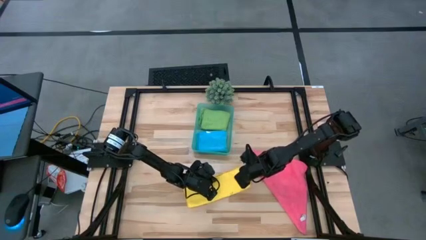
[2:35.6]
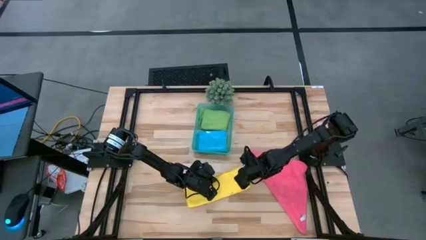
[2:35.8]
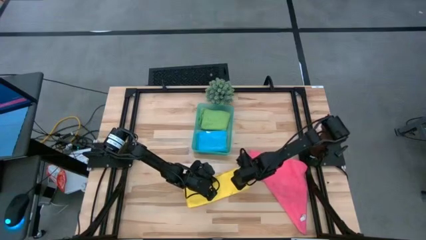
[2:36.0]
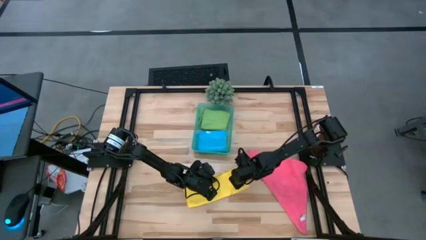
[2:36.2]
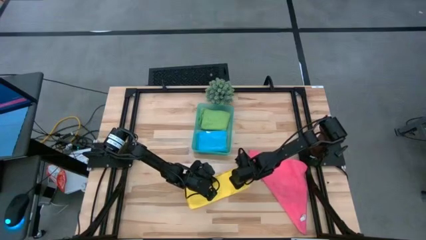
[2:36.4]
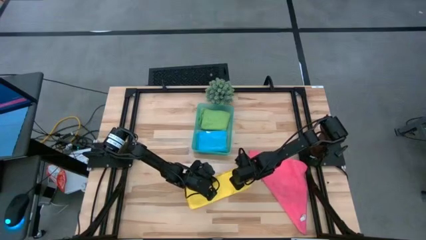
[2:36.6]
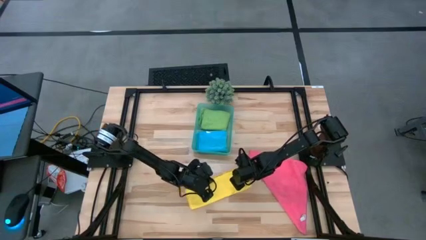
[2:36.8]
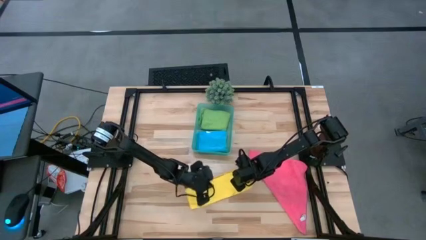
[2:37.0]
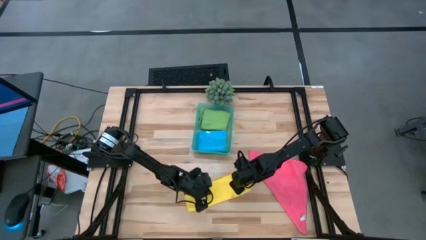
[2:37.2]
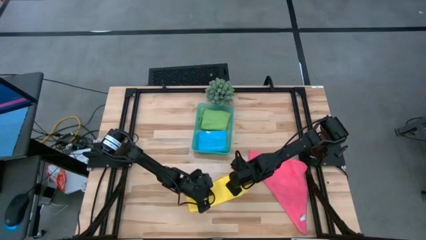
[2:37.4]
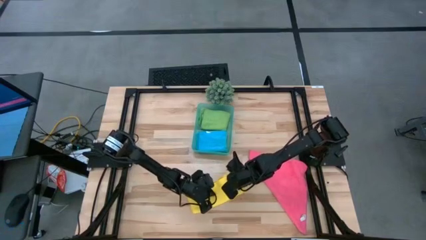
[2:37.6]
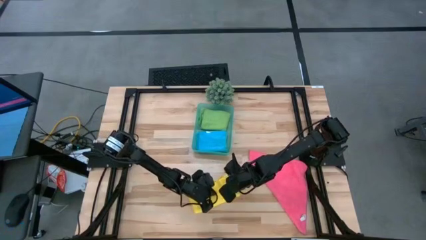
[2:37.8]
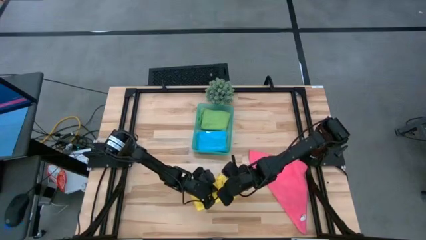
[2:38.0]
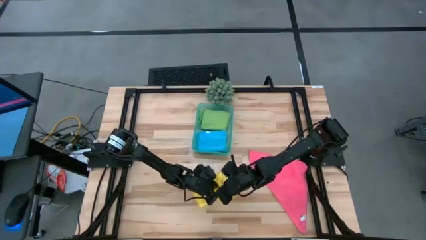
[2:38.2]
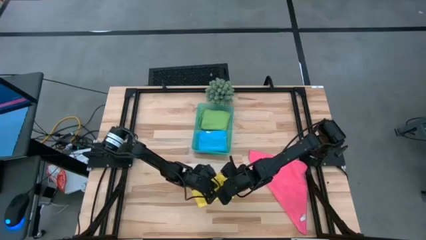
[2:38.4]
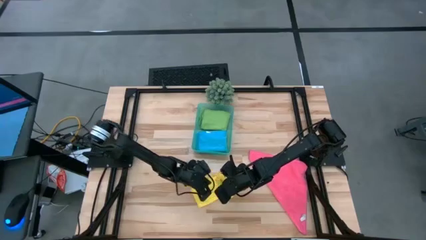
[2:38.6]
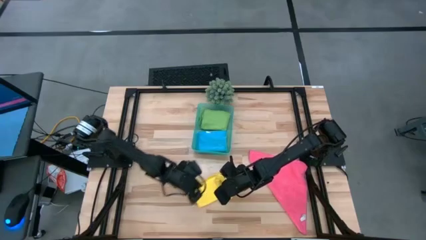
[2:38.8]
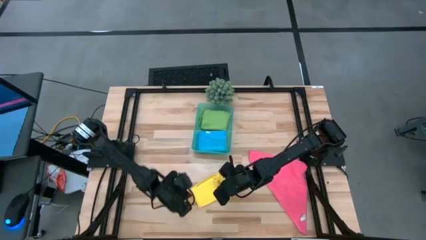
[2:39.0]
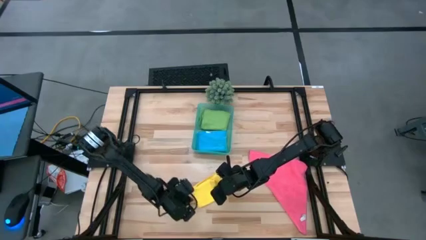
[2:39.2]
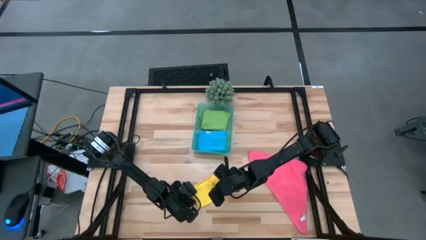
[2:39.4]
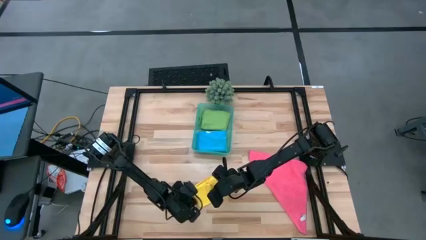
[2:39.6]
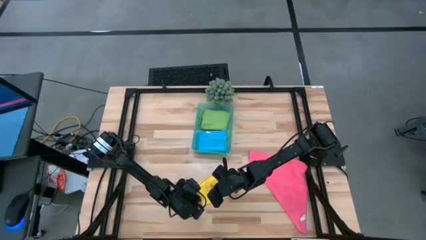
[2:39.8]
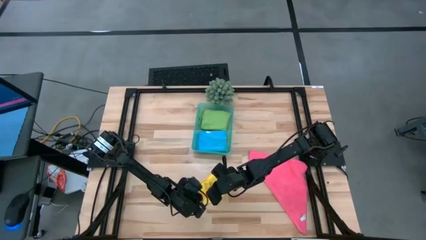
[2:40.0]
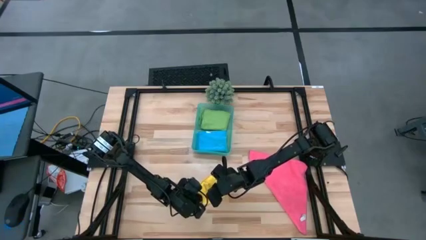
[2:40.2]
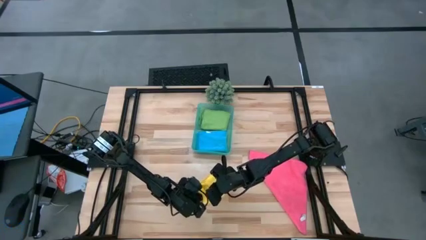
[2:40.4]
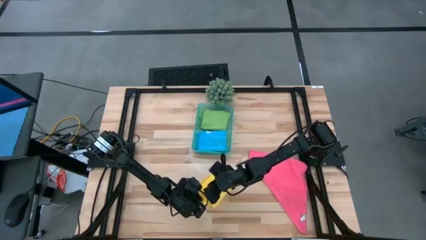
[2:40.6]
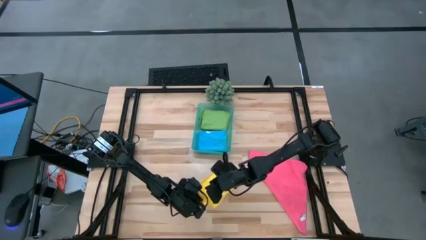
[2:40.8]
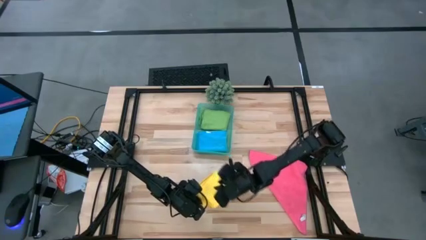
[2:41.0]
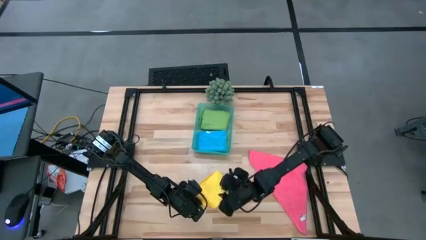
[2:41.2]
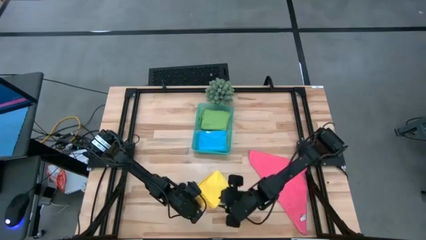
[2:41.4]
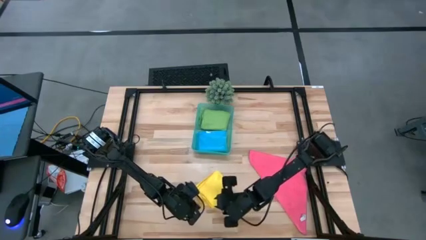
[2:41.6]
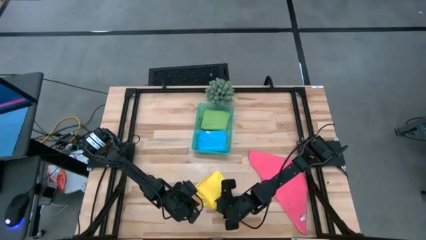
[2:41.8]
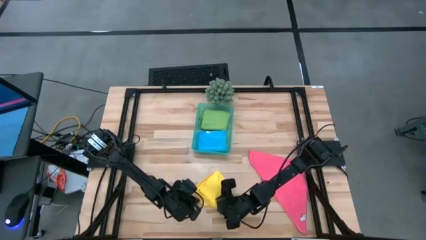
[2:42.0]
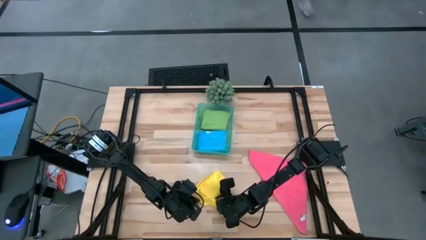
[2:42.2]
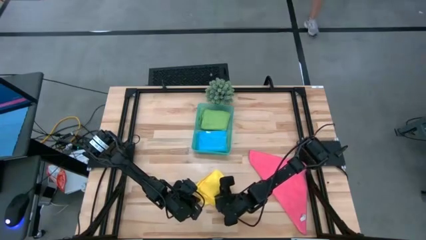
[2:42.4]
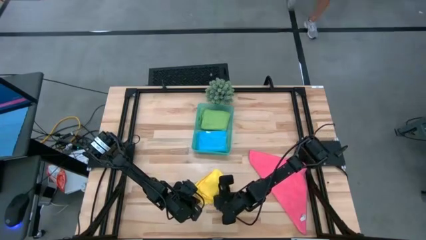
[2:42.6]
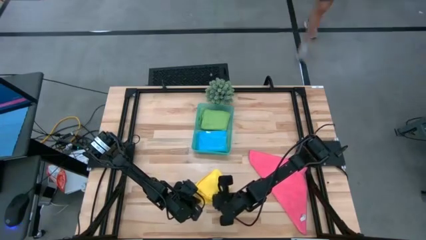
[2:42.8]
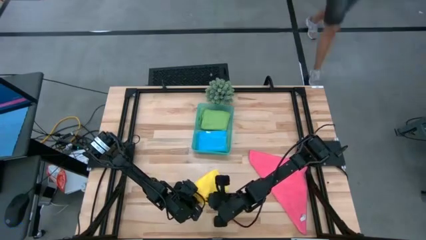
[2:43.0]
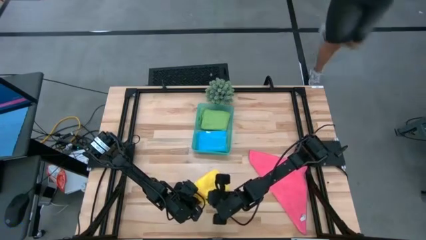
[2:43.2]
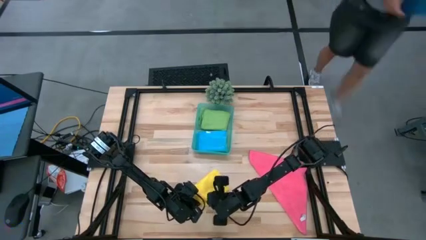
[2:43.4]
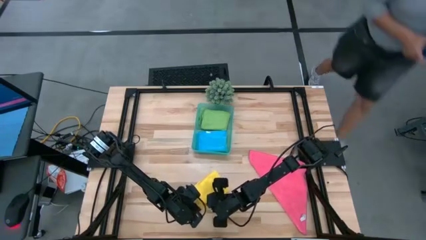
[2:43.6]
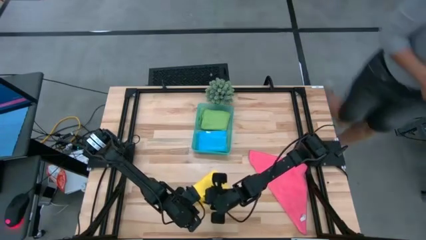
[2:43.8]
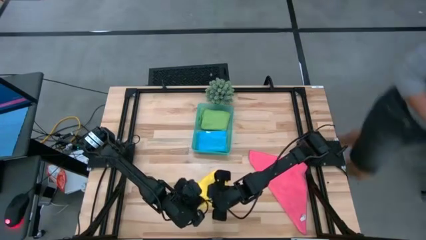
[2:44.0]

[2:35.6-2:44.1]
Task: Fold microfiber towels
Fold the yellow micro fiber cloth

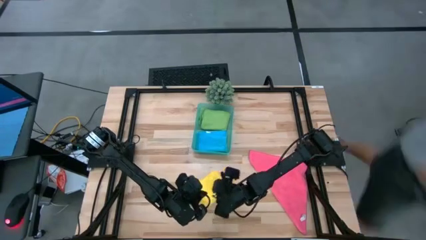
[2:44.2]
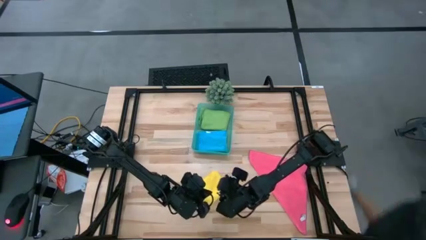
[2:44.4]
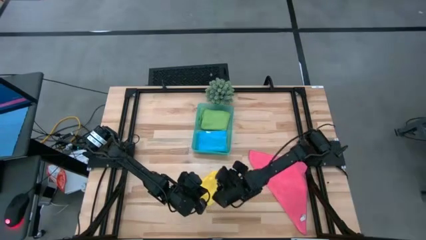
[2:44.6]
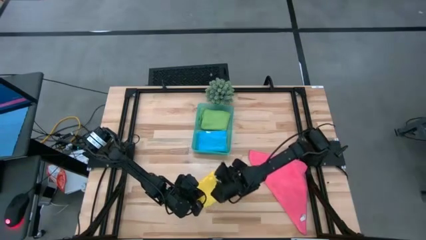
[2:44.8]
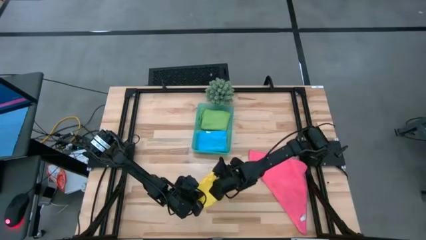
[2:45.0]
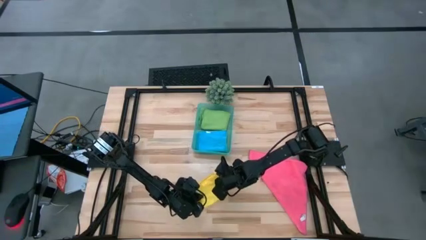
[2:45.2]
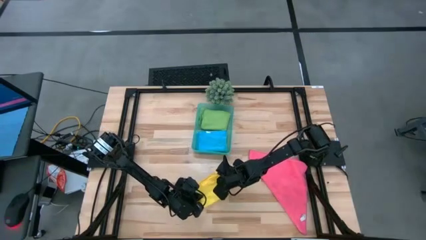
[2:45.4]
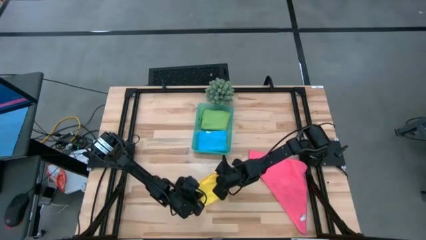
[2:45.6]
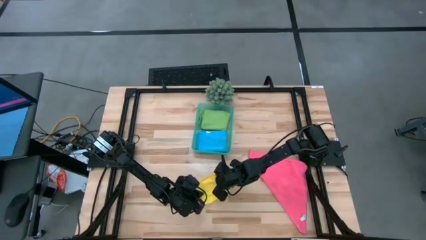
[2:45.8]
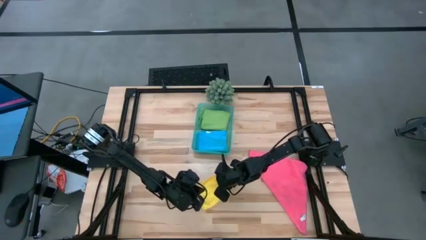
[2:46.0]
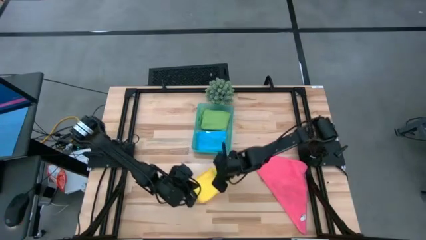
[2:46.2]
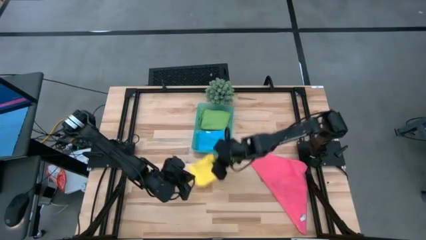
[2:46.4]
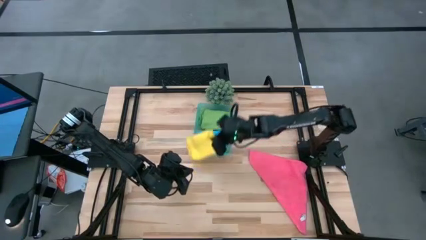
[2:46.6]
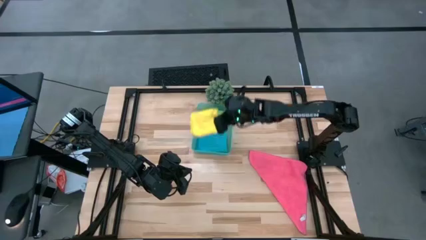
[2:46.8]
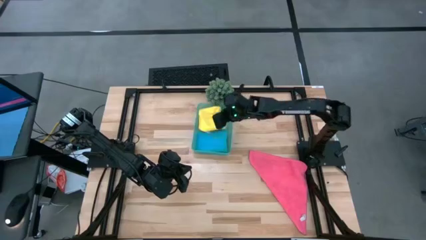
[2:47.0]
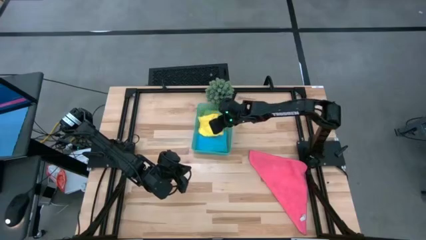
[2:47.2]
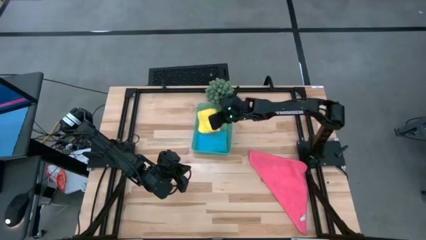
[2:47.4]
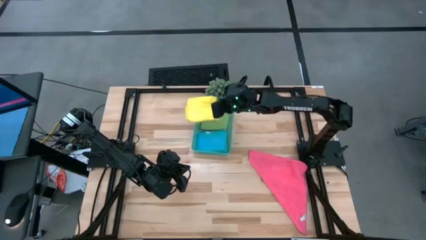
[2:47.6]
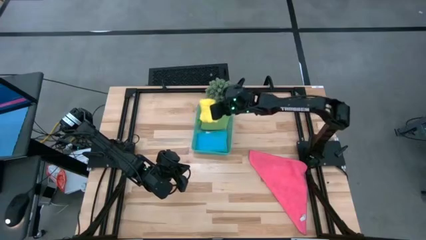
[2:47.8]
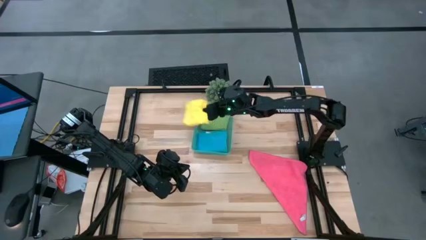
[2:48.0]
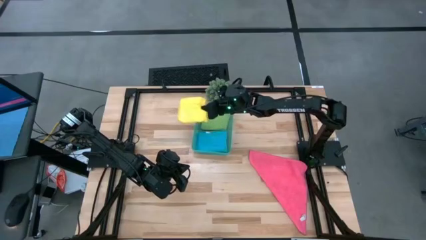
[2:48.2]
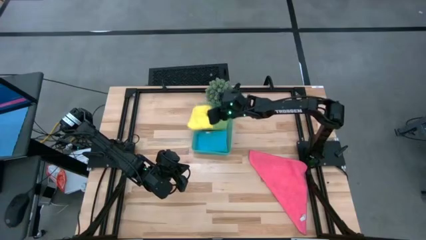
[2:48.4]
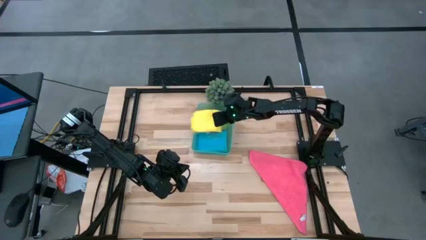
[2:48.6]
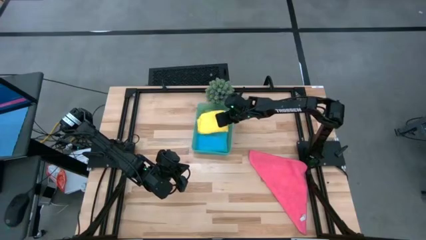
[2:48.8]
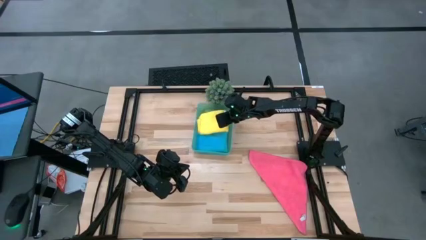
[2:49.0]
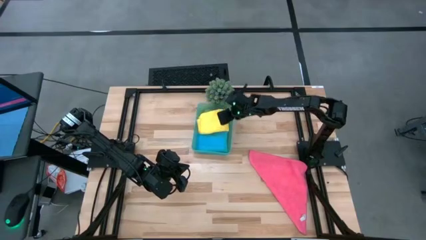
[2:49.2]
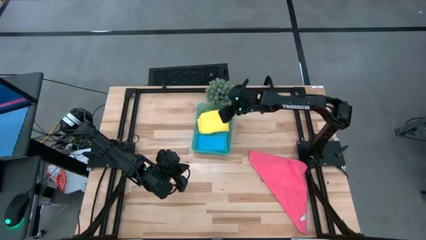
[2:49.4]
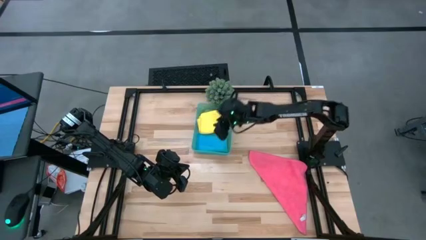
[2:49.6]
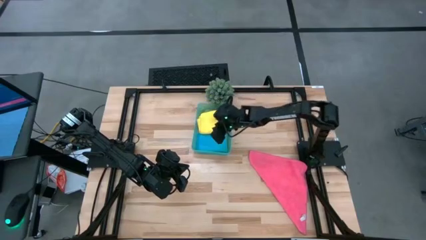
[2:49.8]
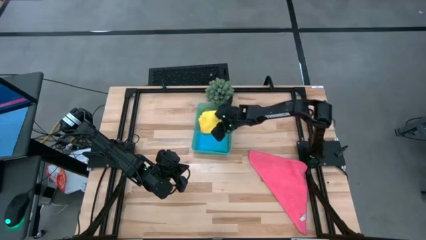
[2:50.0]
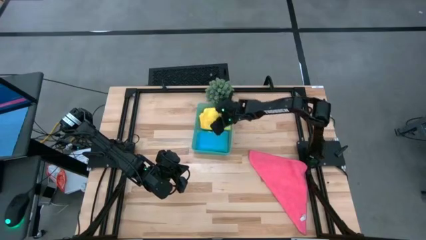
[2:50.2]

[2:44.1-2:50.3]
Put the yellow micro fiber cloth into the bin on top of the green micro fiber cloth

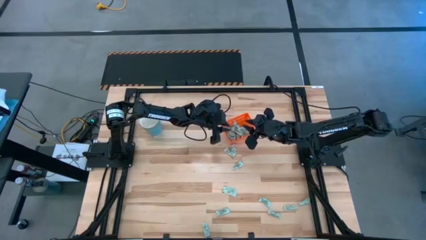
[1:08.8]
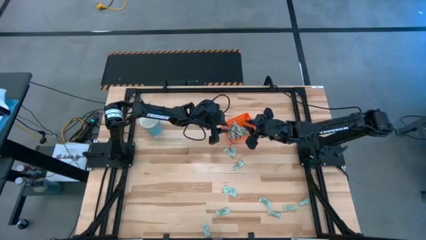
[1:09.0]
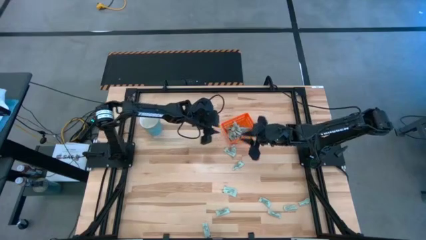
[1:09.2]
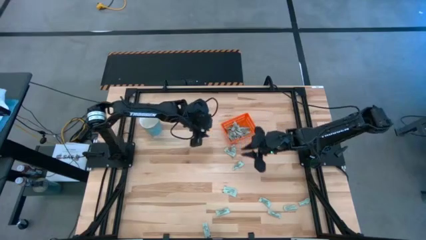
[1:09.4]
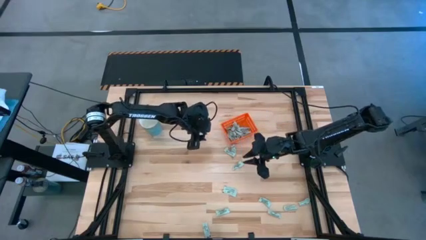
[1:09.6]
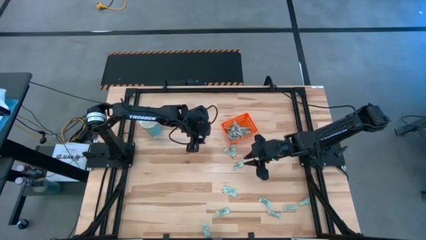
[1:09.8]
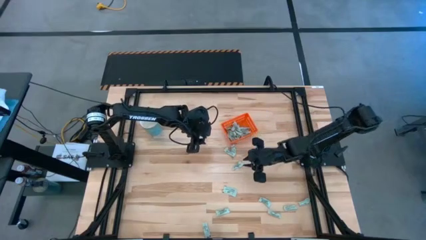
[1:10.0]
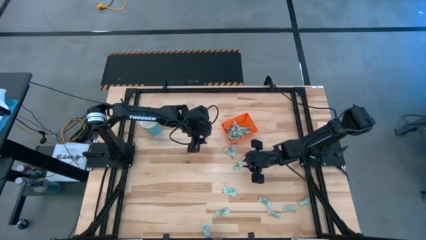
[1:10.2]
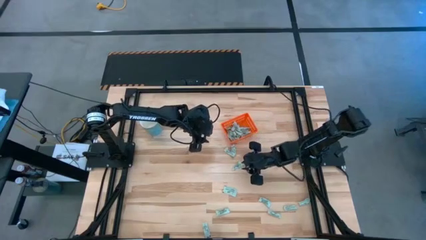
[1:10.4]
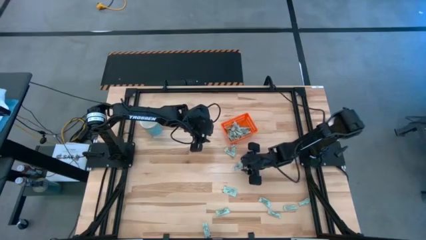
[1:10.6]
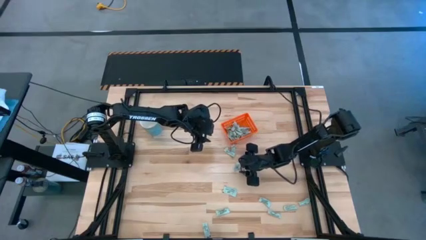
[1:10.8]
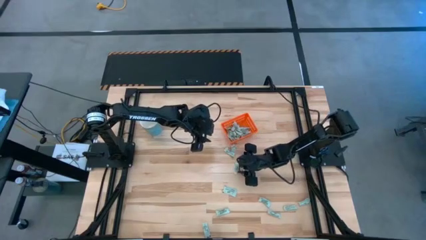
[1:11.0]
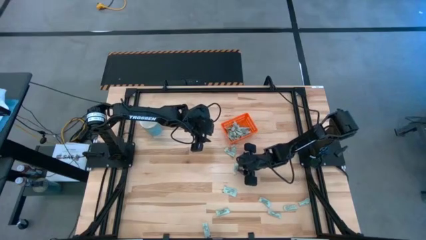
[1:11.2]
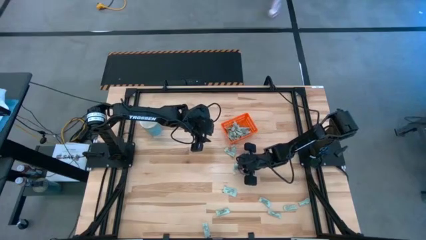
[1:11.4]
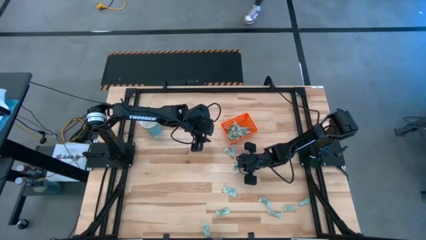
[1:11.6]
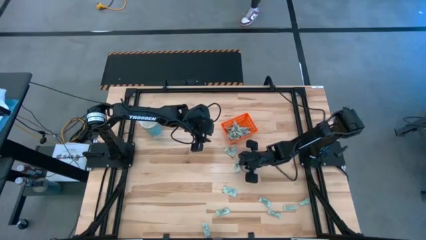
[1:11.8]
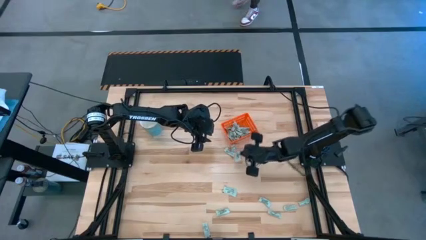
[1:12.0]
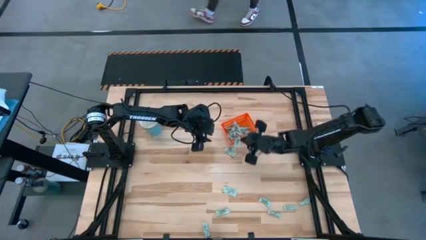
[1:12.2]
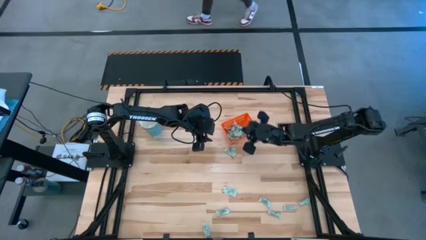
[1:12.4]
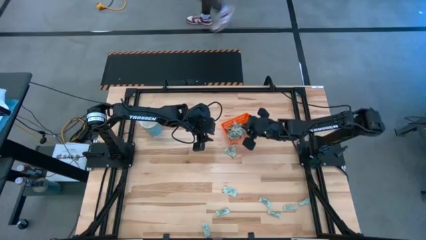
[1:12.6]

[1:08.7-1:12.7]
Task: Pick and place Stevia / Truvia into bins
Put the stevia packet into the orange bin
